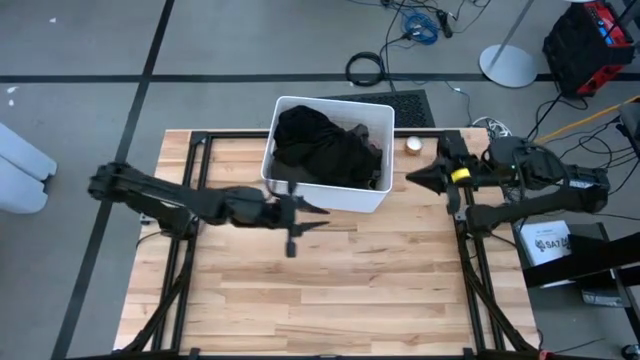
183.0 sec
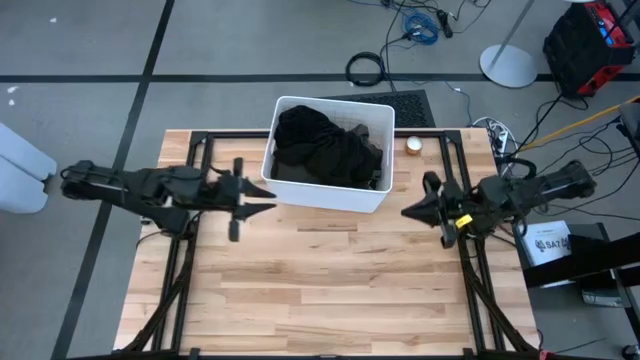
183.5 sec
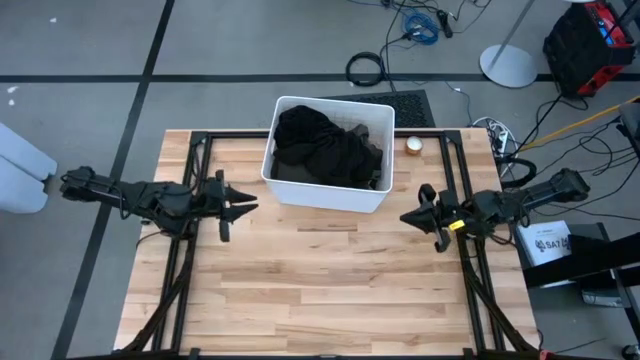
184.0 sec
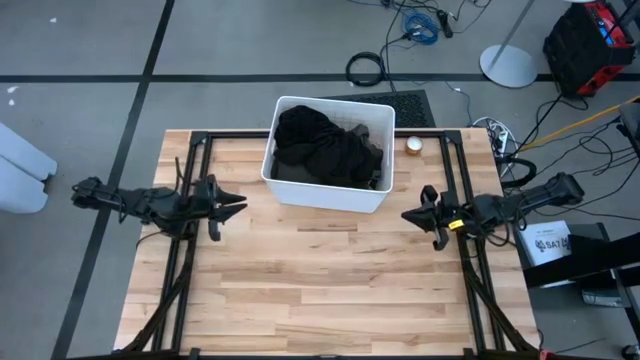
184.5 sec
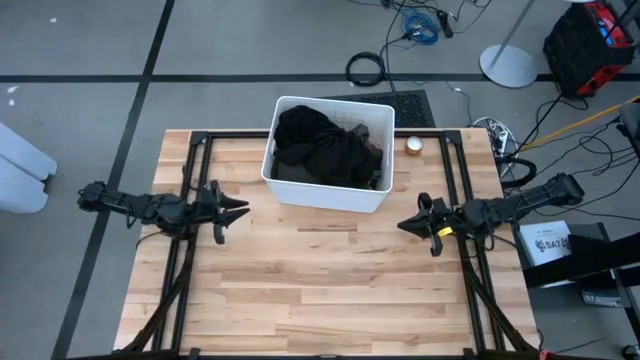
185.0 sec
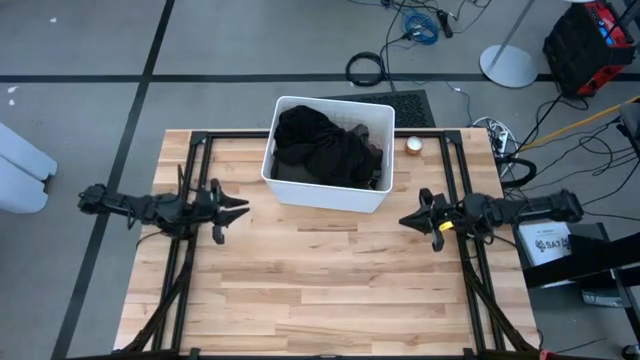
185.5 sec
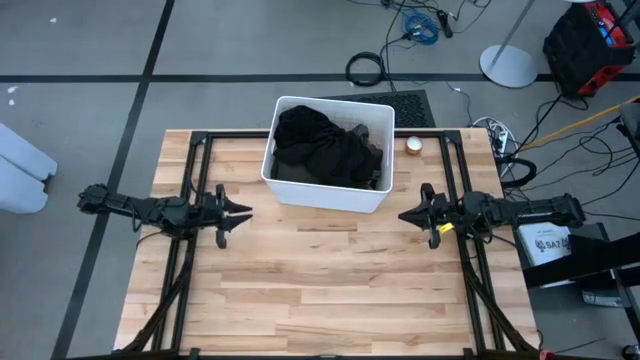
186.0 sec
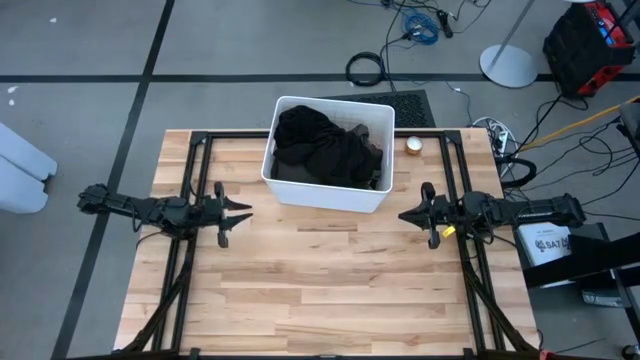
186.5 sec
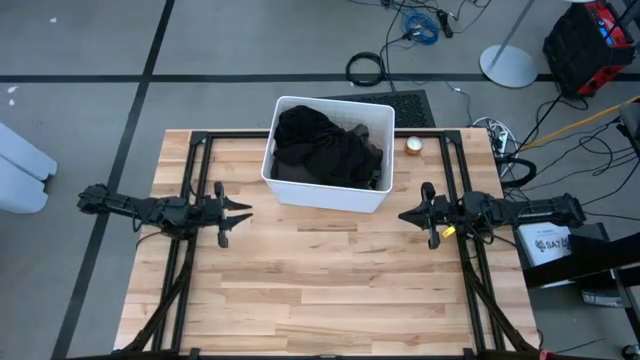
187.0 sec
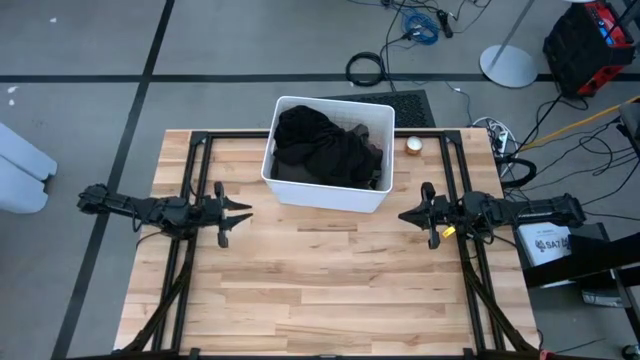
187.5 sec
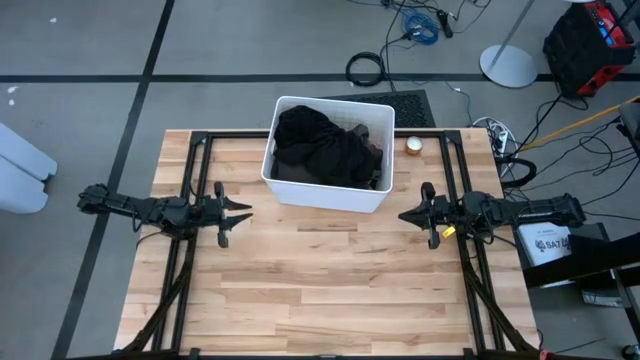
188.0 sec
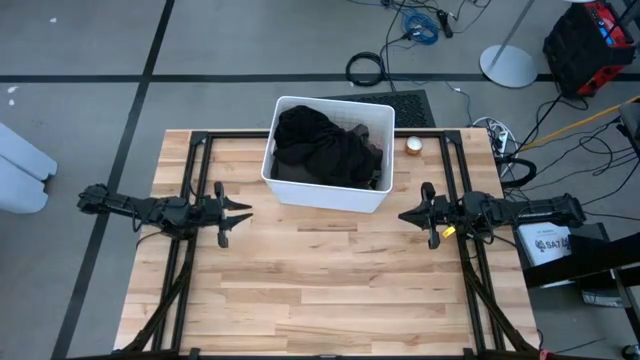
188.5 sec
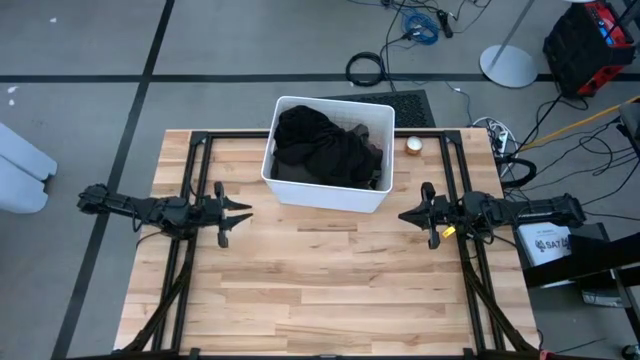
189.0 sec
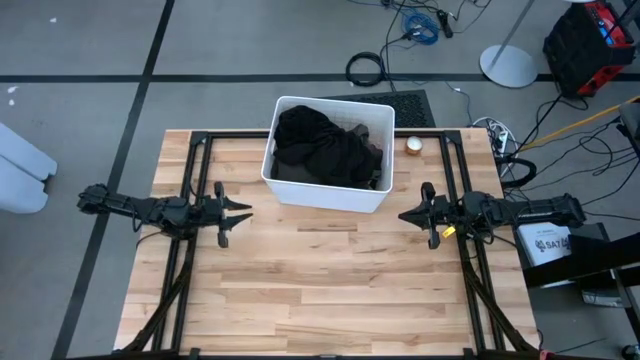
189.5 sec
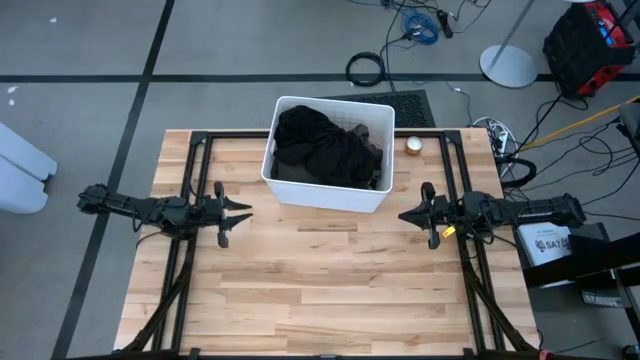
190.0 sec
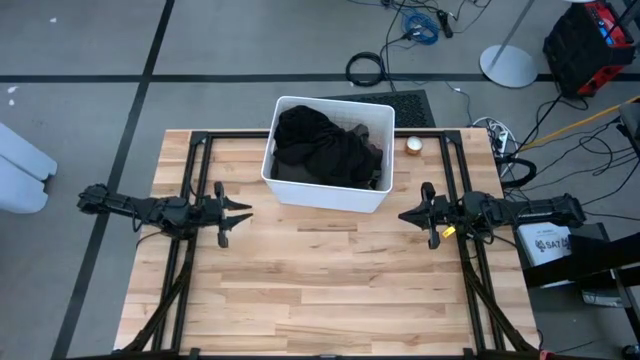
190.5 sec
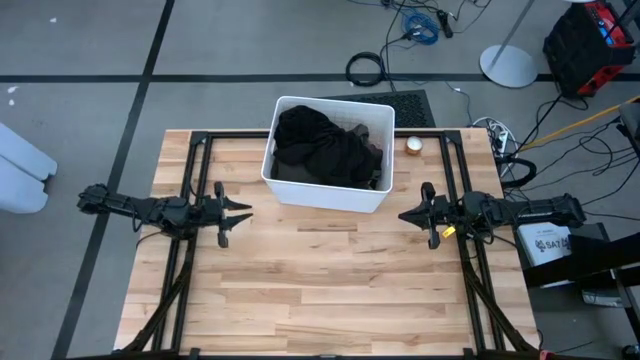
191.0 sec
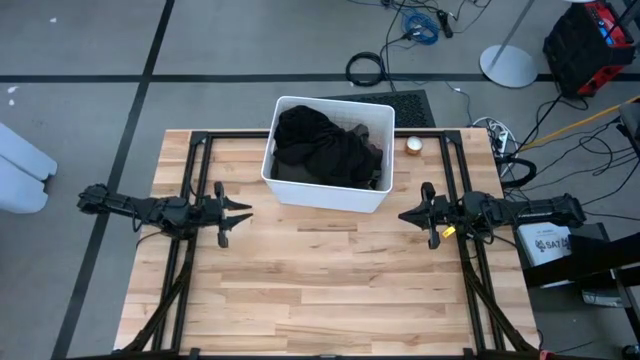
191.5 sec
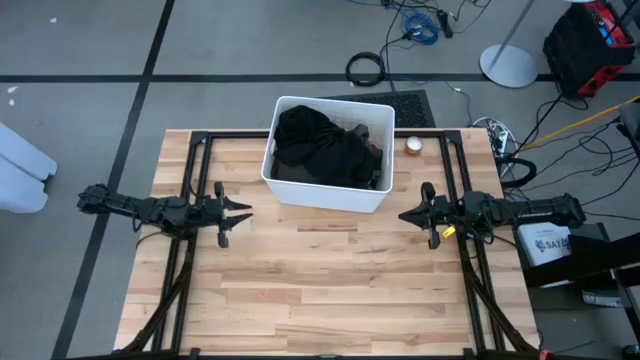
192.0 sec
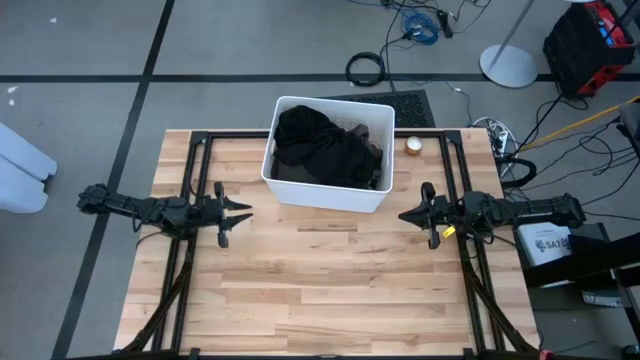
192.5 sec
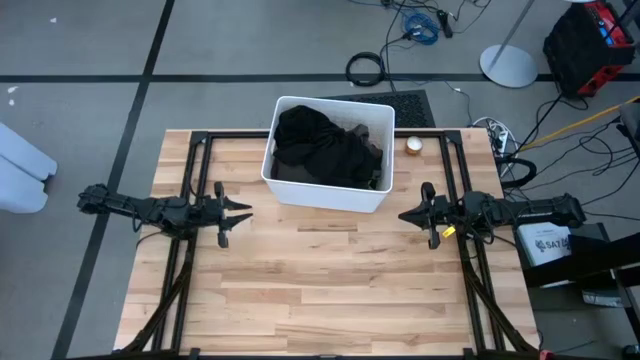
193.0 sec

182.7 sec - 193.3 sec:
Task: Sort clothes
Return to Home Position

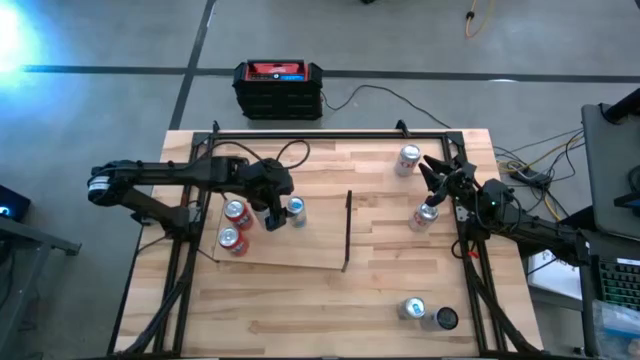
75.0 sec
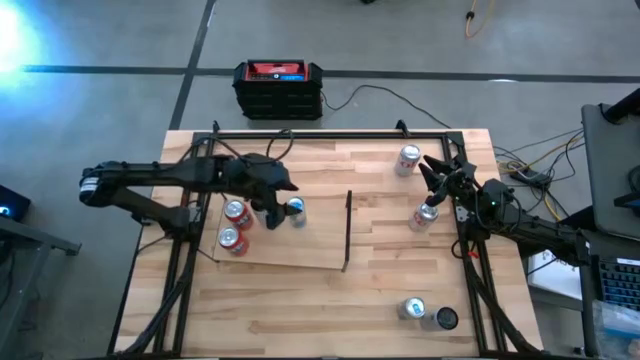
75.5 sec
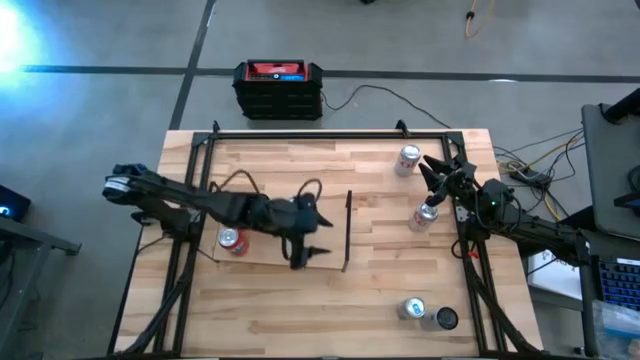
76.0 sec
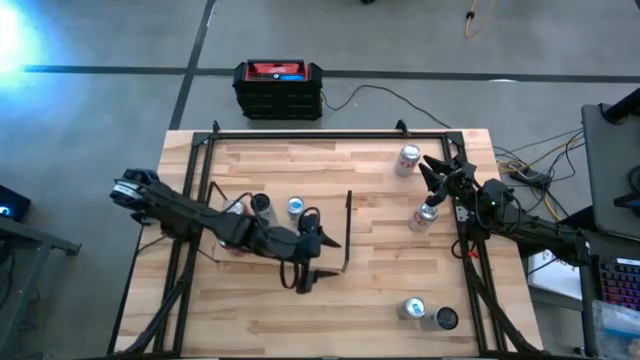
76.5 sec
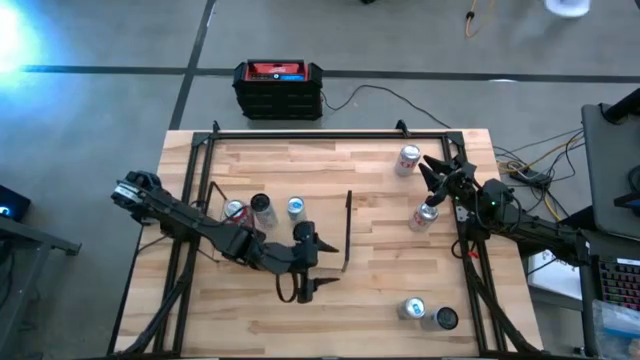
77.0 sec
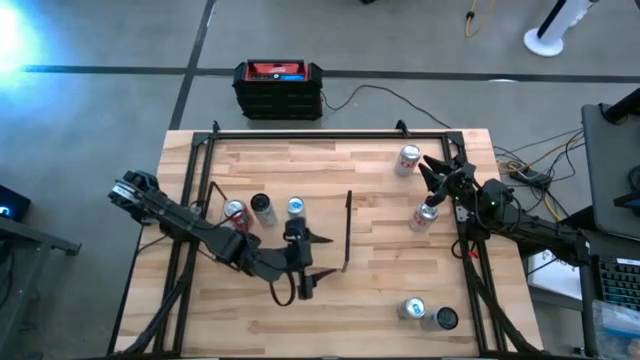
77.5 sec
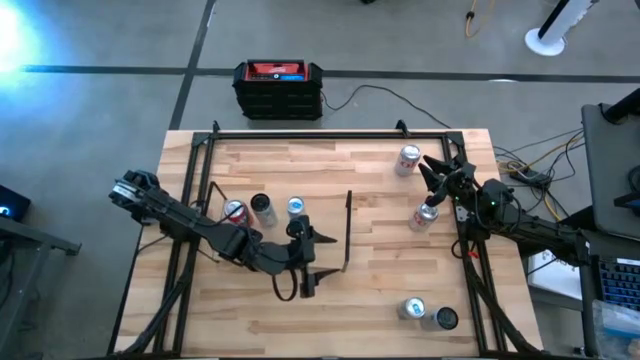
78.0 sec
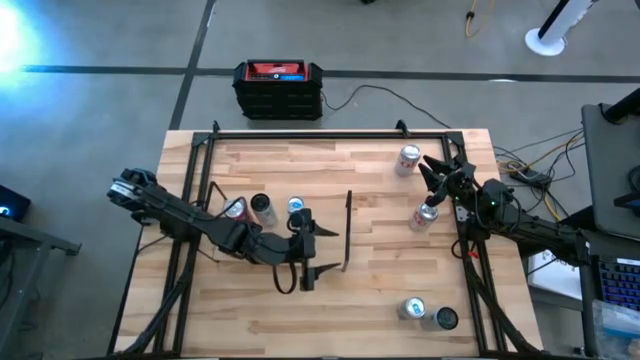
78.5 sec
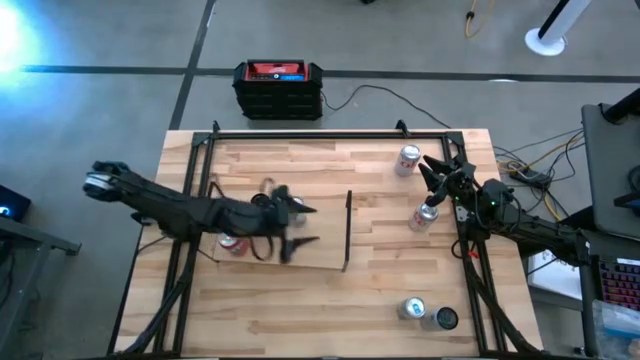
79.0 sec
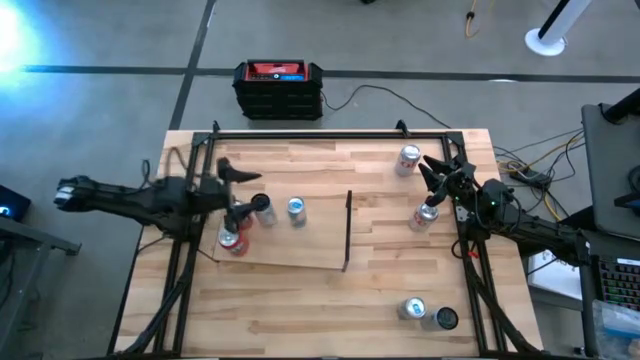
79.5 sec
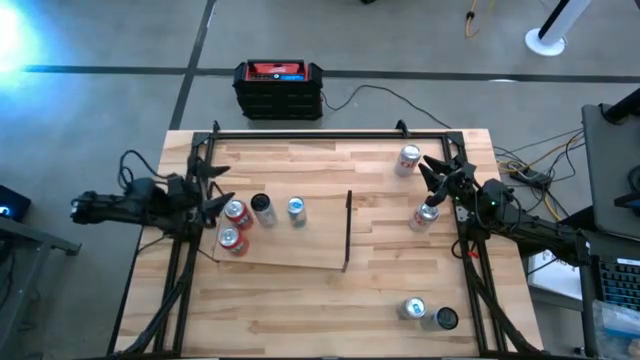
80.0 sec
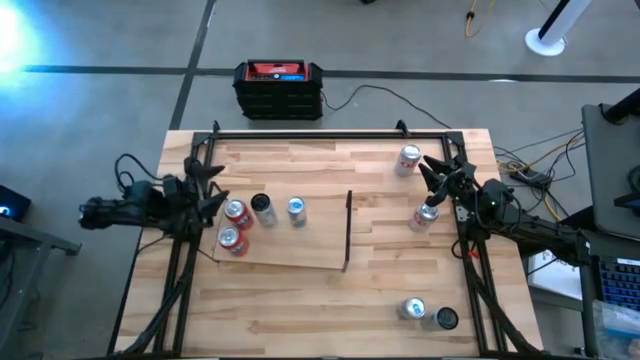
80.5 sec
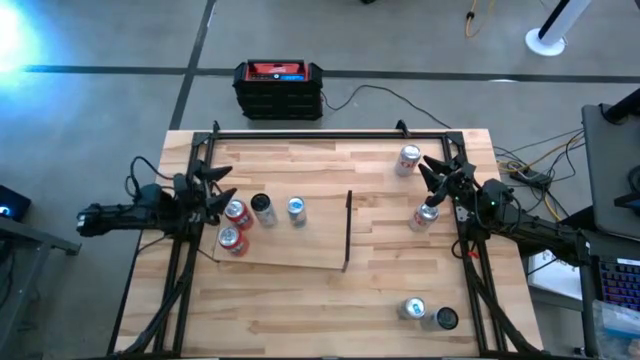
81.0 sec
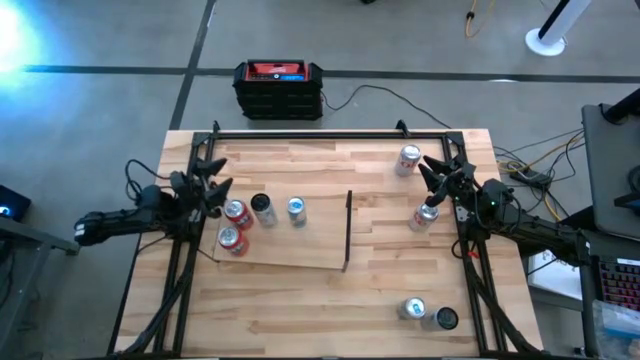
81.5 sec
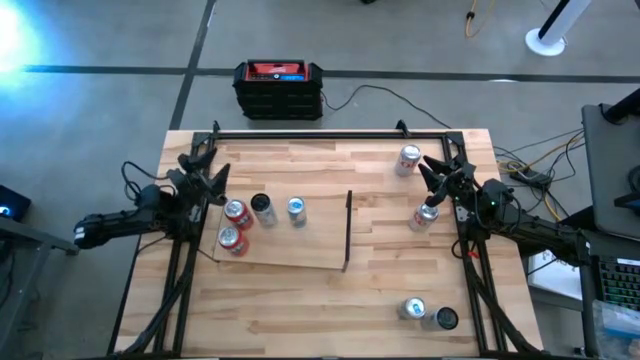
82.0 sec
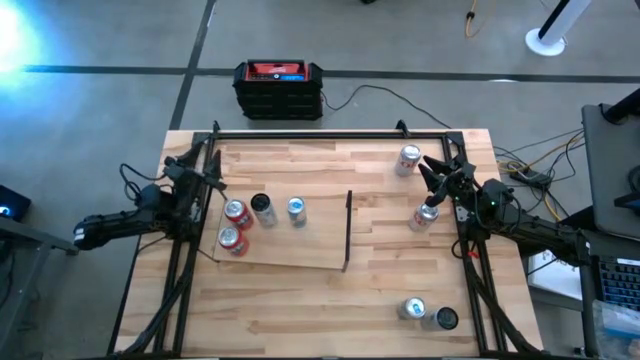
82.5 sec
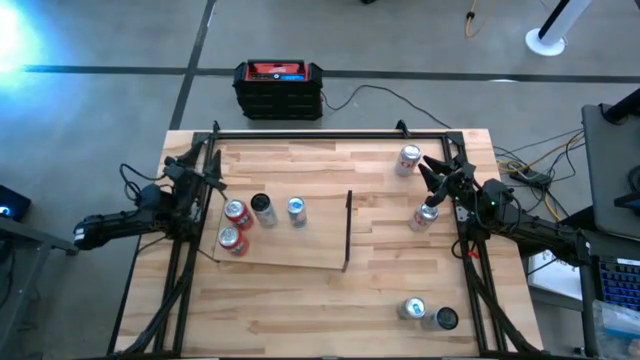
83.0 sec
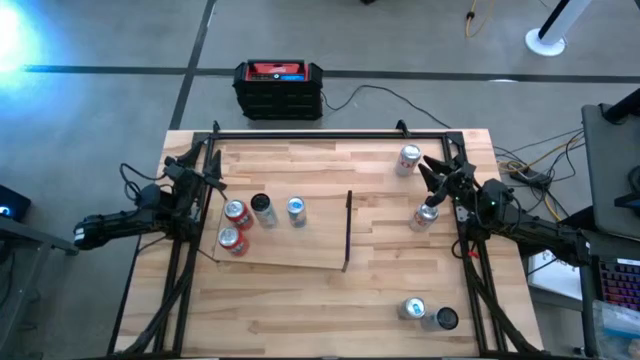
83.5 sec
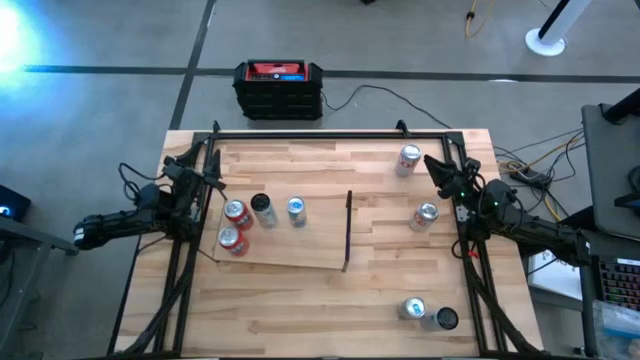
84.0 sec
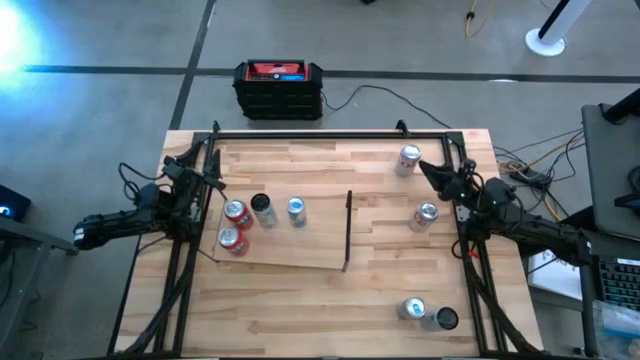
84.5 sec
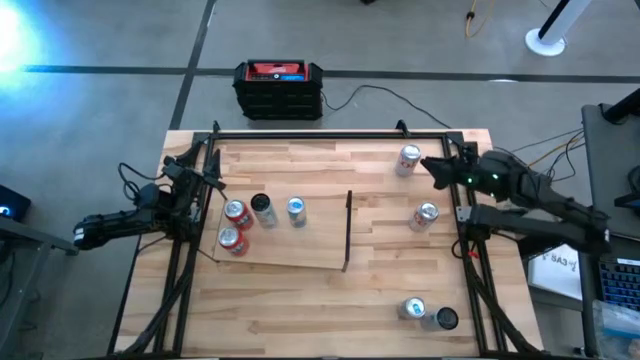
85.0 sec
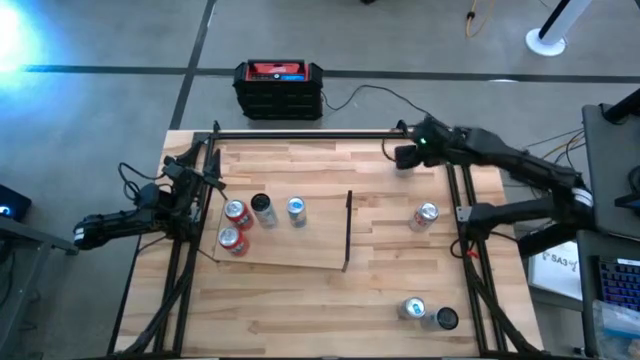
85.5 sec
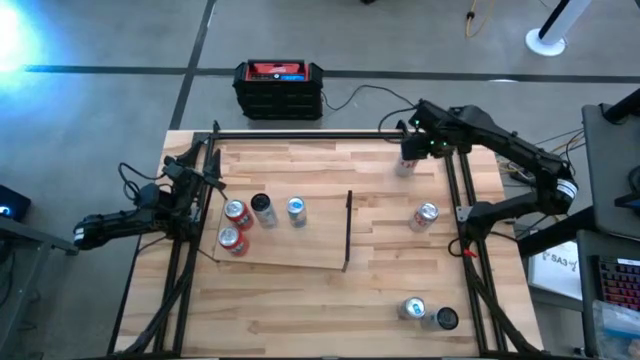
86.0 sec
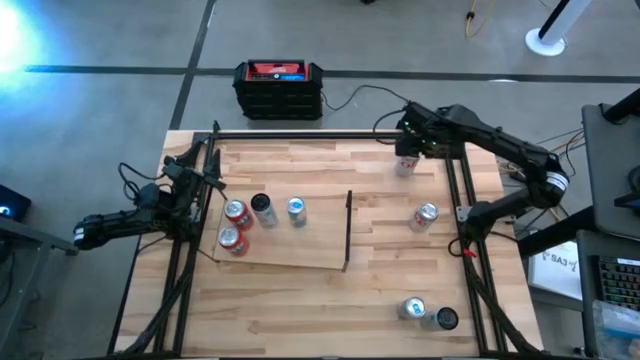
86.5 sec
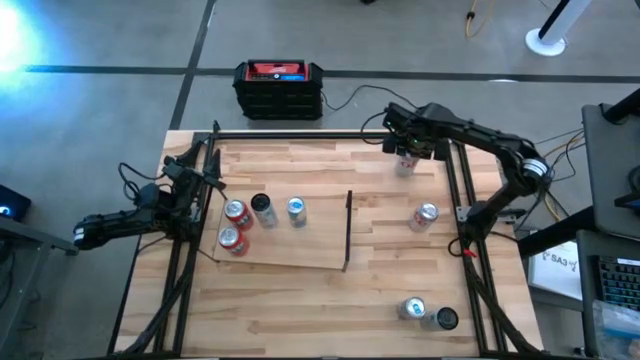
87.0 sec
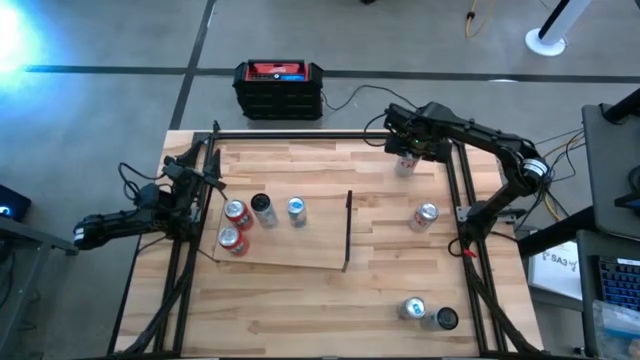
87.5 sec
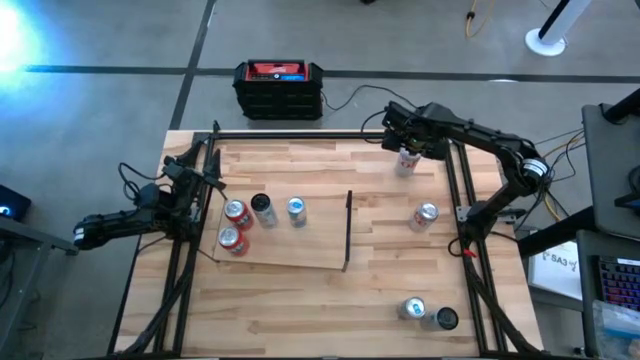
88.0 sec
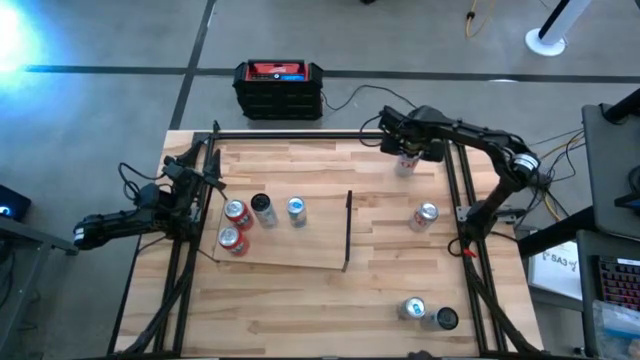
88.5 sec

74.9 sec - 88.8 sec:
Task: Place canned beverage on shelf
Put the top silver soda can on the shelf
